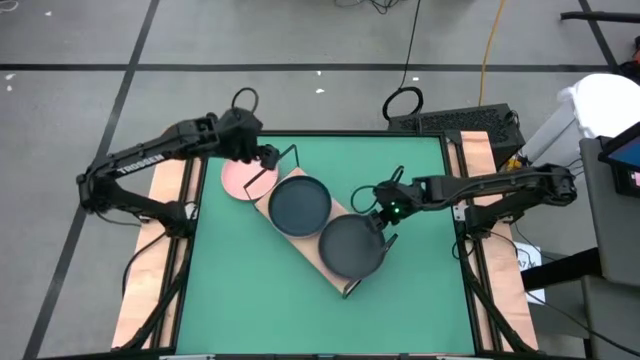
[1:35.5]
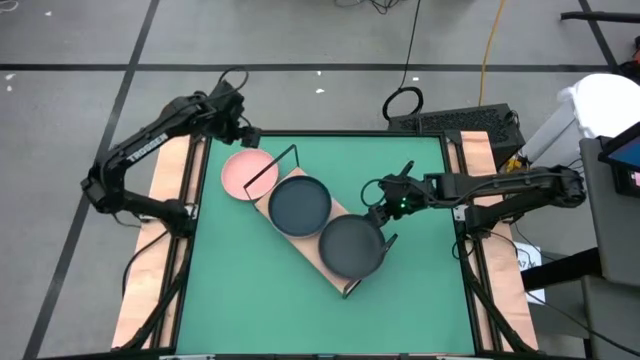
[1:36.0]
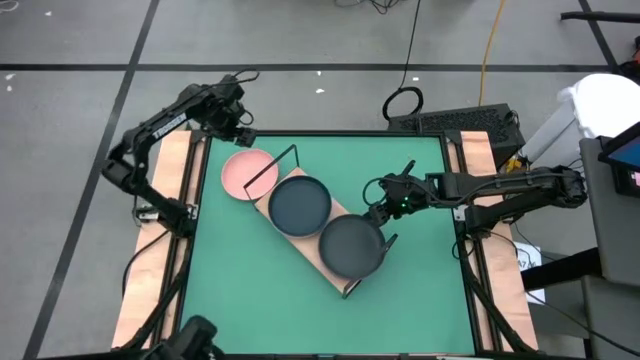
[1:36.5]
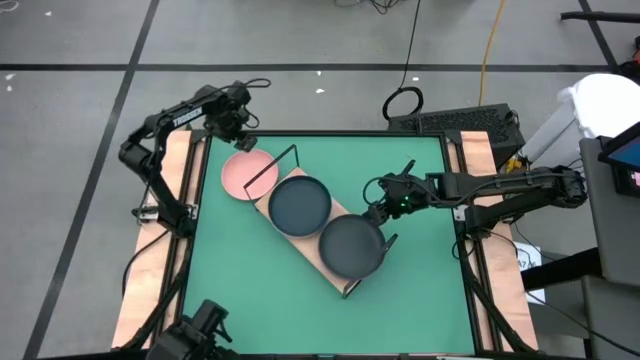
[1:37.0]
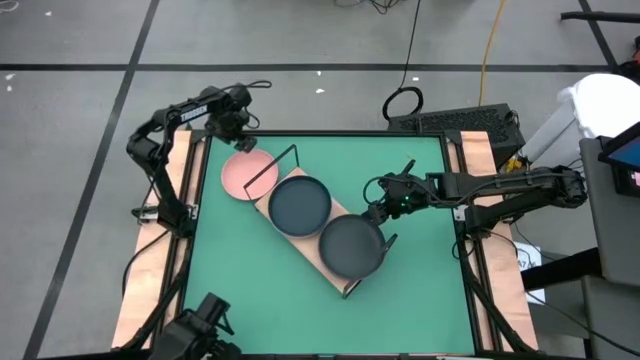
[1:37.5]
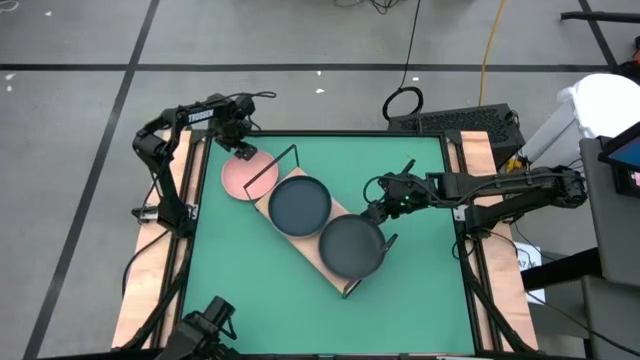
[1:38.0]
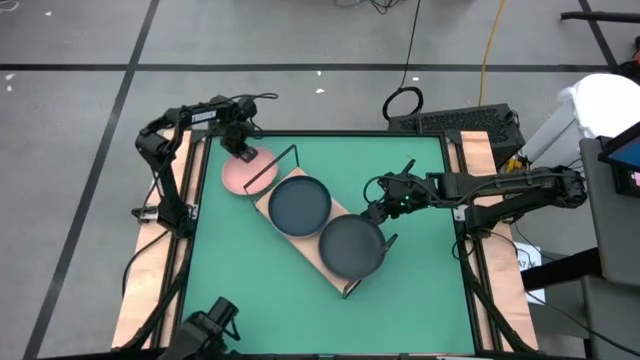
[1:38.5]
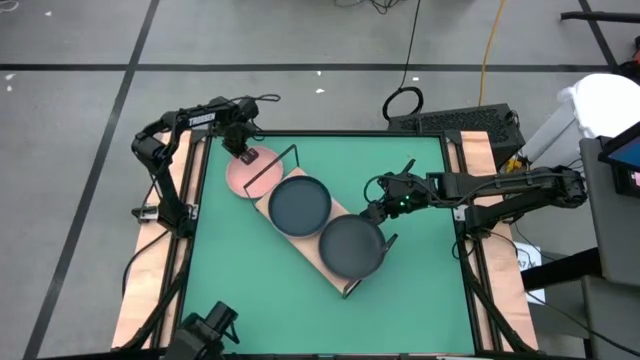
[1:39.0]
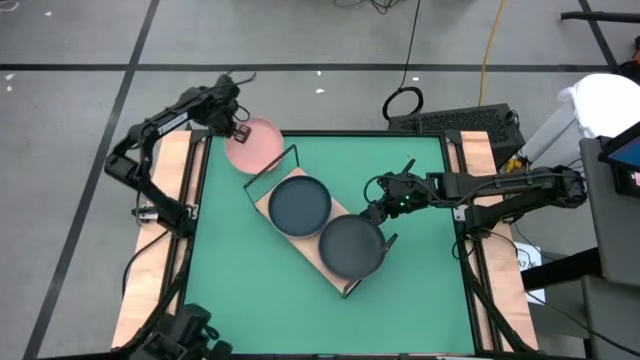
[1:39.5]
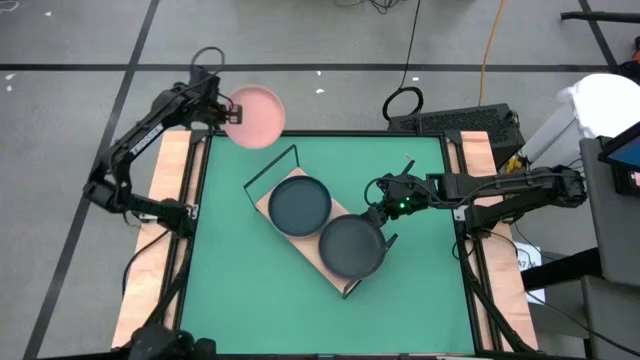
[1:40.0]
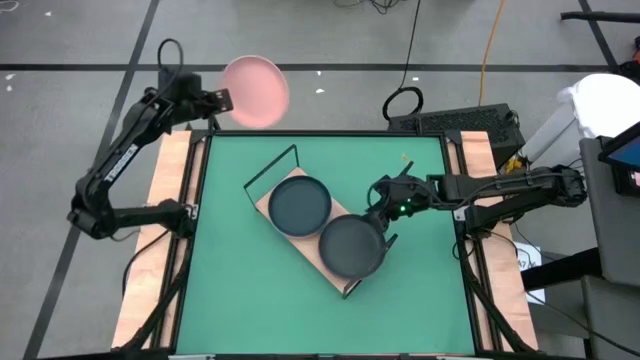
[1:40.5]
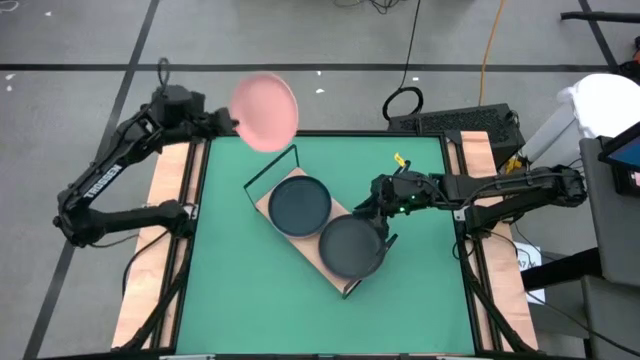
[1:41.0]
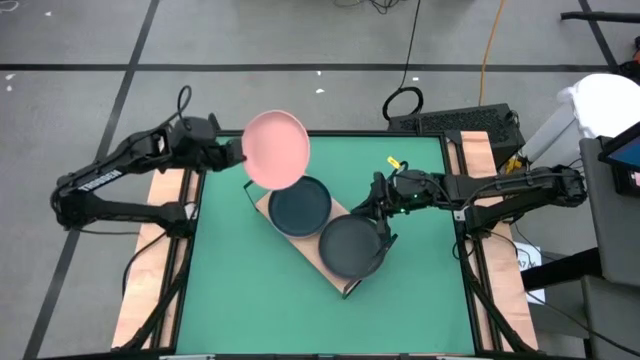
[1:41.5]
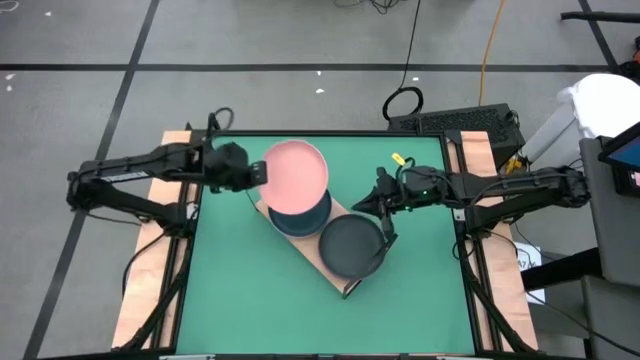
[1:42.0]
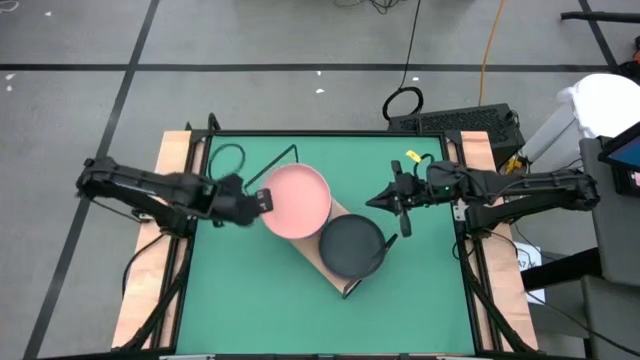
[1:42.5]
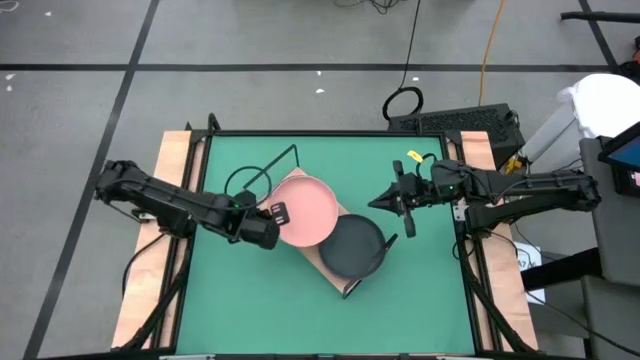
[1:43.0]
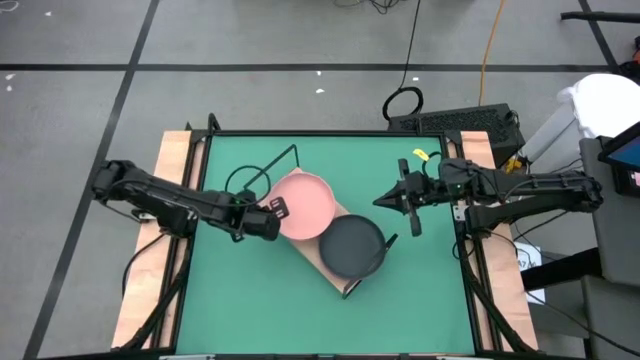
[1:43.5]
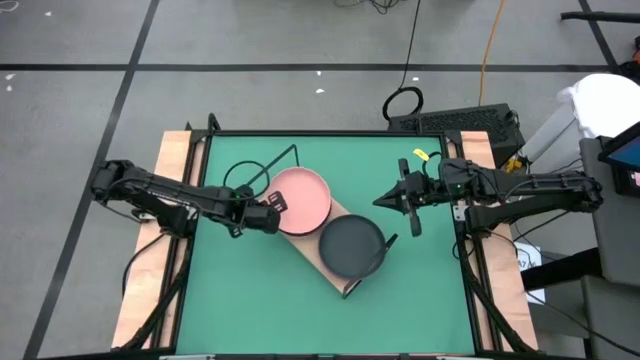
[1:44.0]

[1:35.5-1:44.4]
Task: Place and stack plates onto a shelf
Stack the light pink plate on the dark blue plate on the shelf

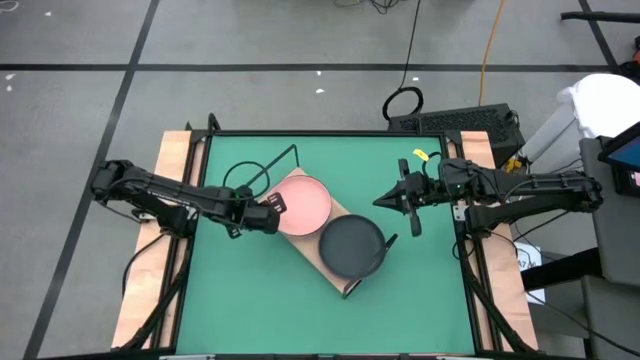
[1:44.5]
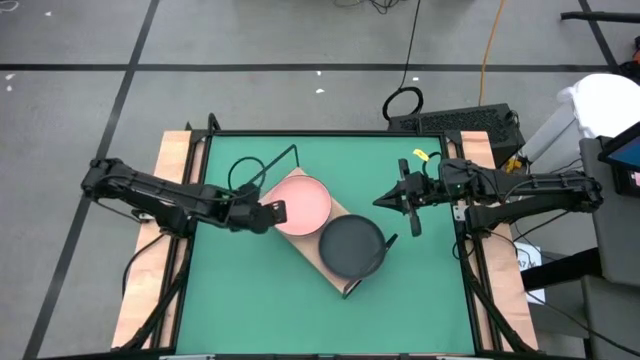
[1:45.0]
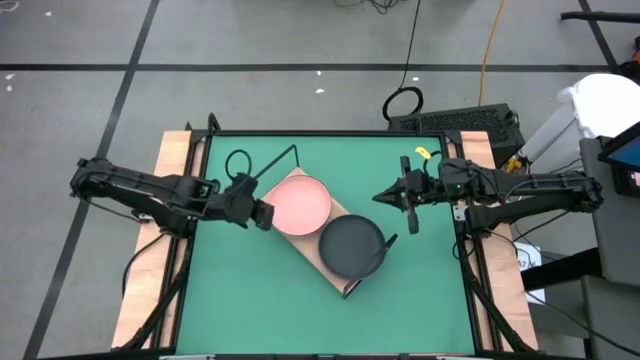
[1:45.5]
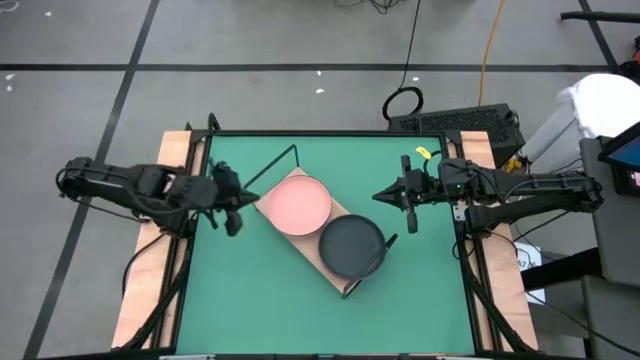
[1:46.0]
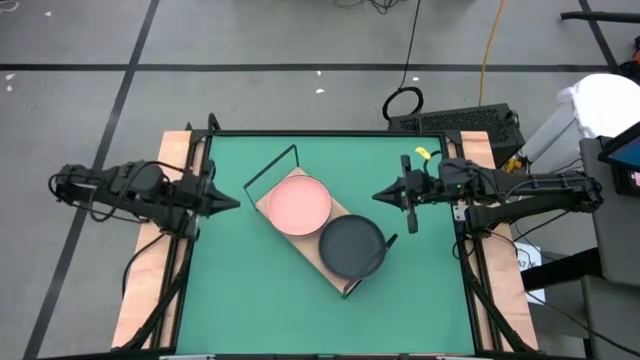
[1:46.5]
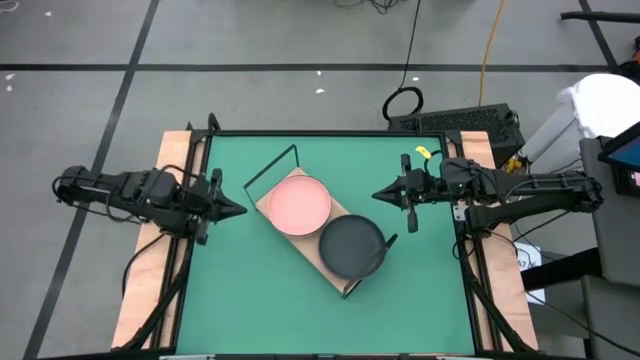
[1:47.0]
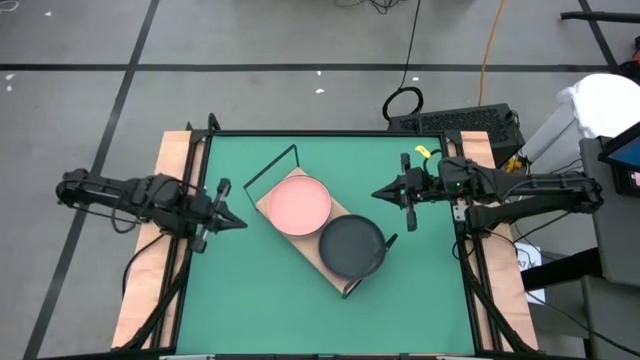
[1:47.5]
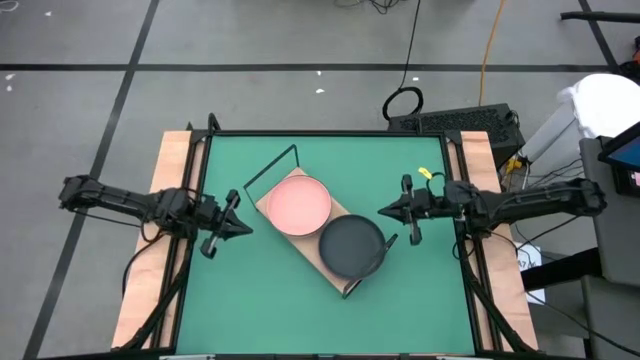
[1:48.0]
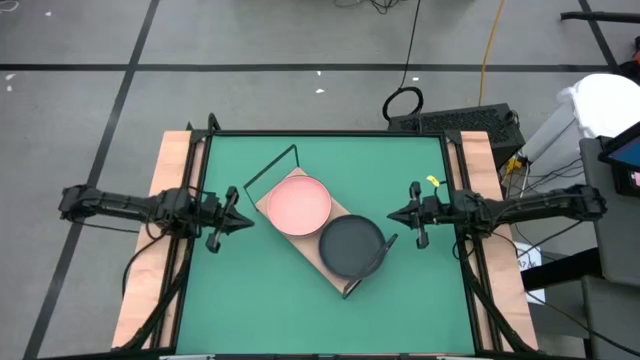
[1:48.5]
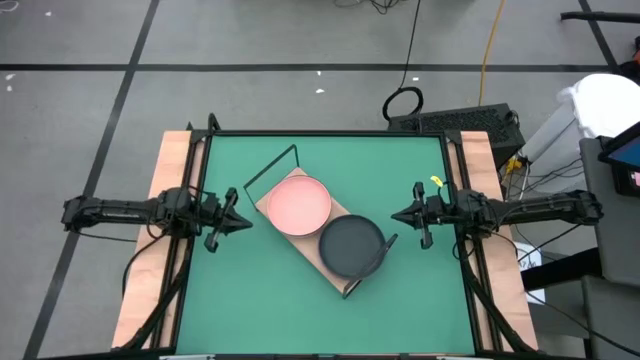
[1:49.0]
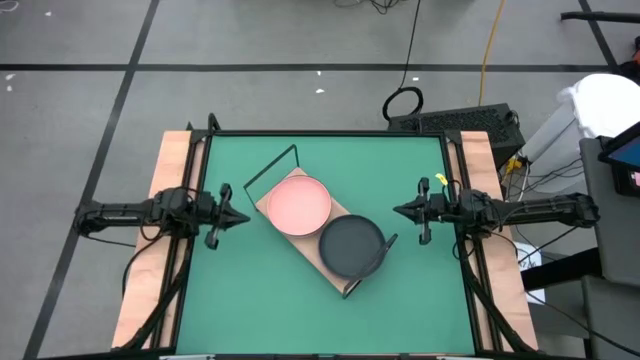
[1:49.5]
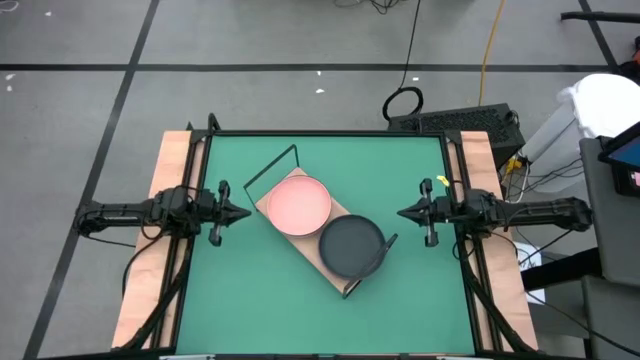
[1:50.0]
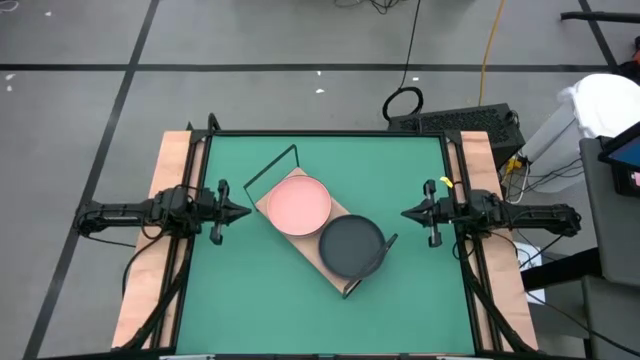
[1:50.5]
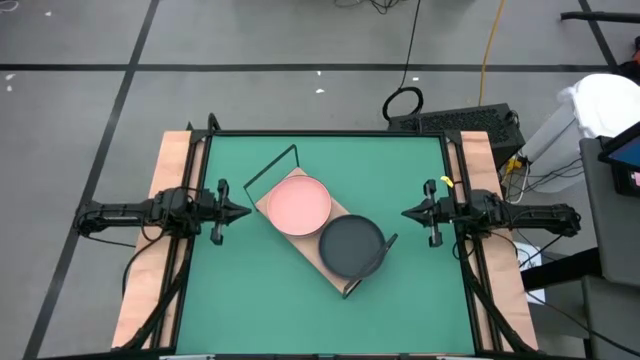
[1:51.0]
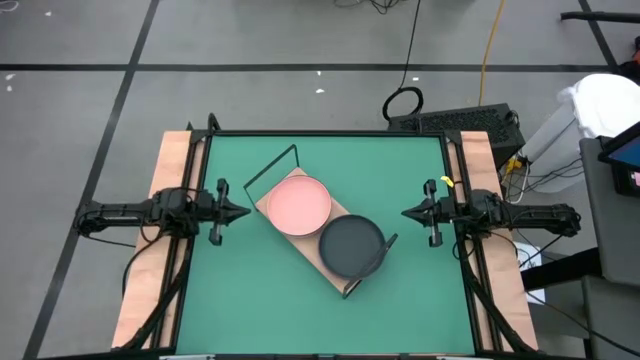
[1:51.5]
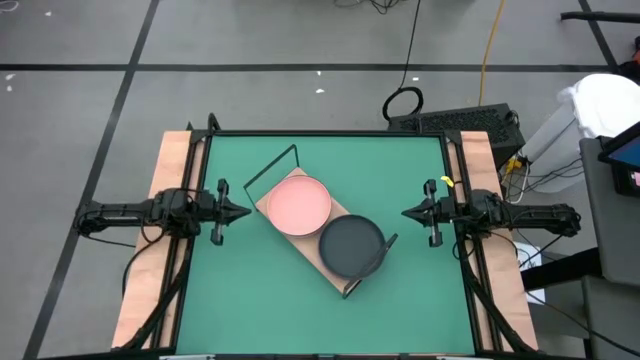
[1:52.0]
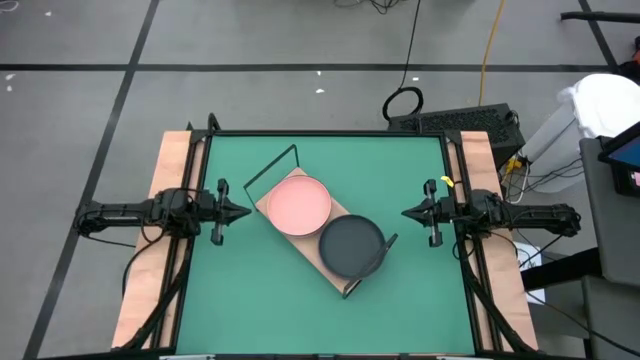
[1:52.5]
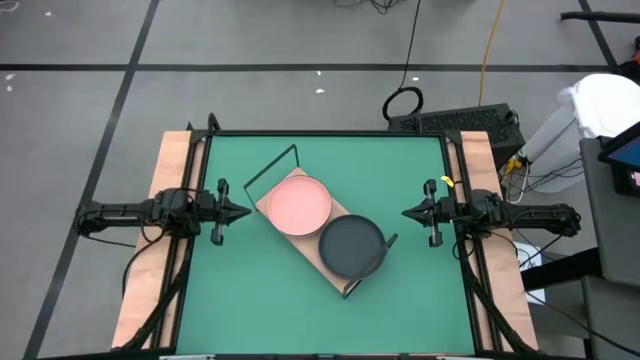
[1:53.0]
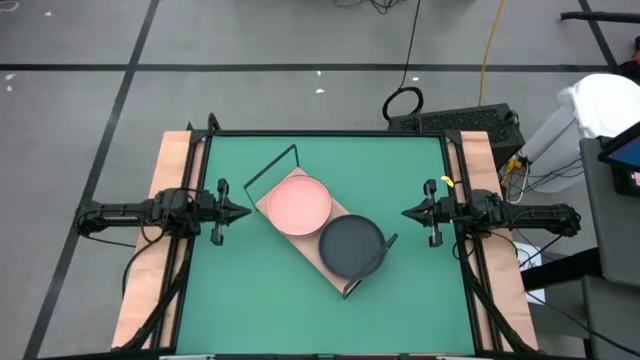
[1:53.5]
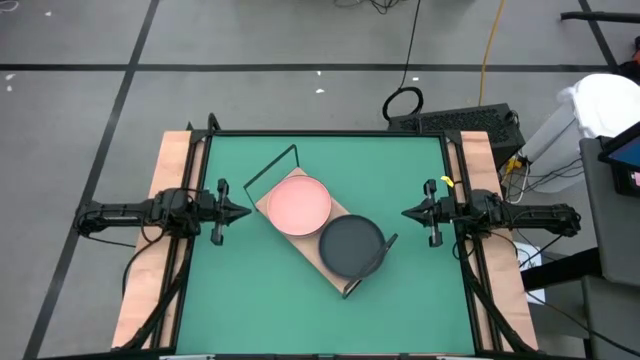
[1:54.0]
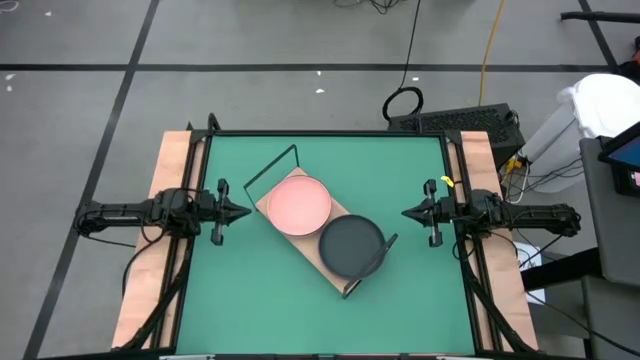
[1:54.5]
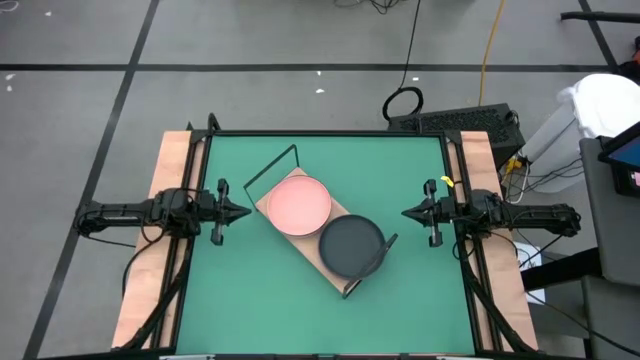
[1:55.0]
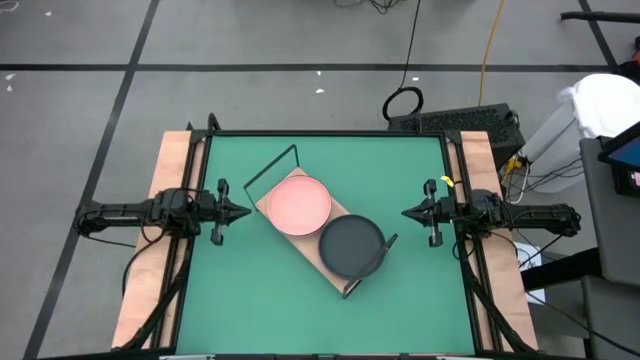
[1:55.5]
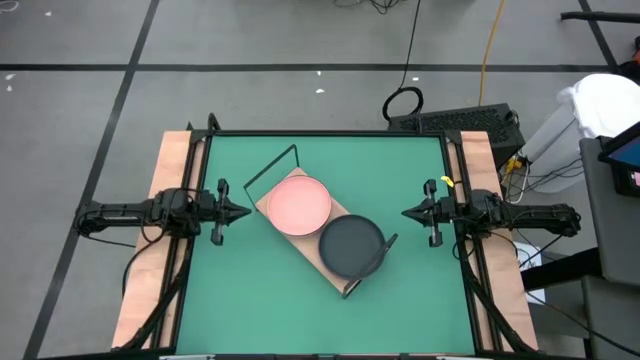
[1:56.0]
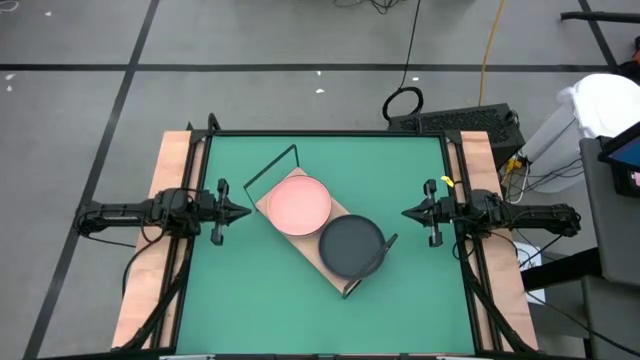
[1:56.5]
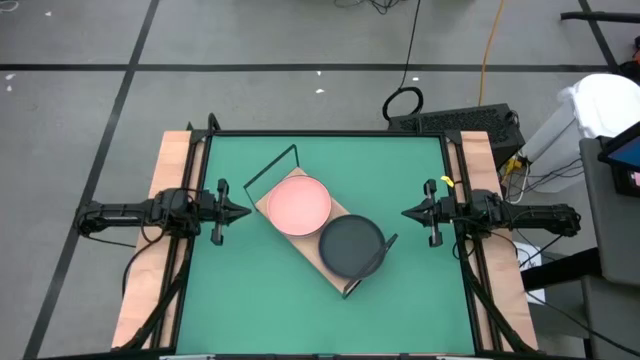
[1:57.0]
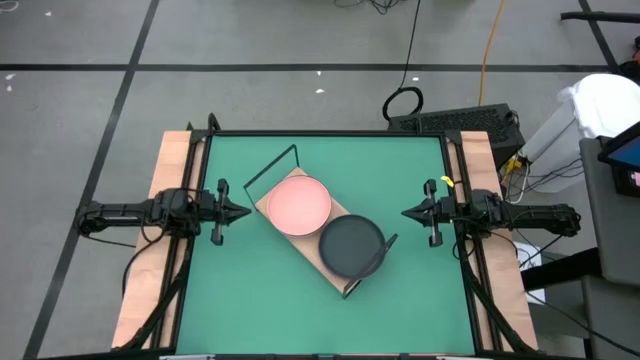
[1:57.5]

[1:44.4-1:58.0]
Return to Home Position
